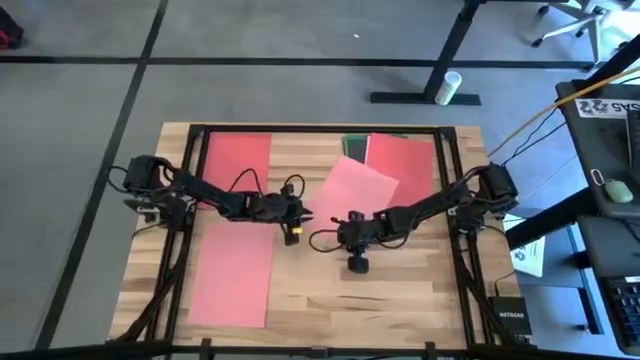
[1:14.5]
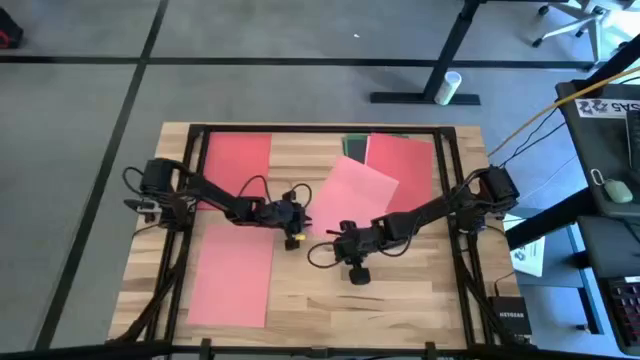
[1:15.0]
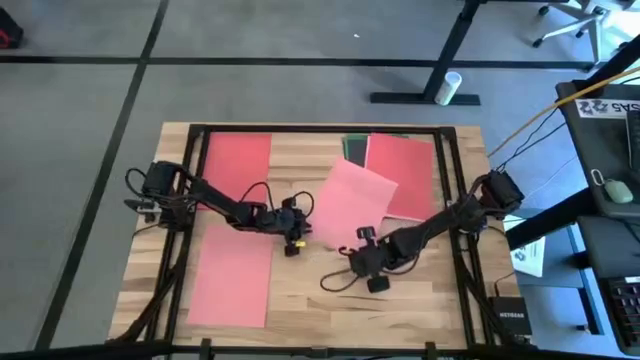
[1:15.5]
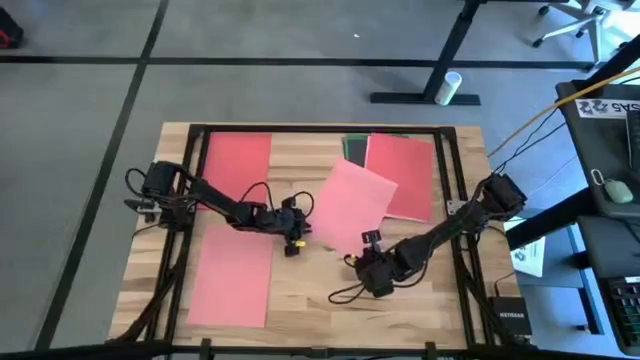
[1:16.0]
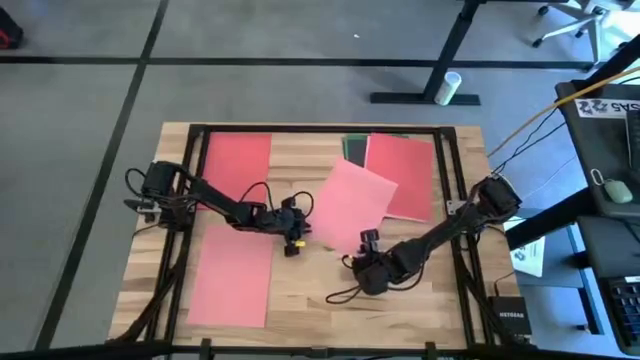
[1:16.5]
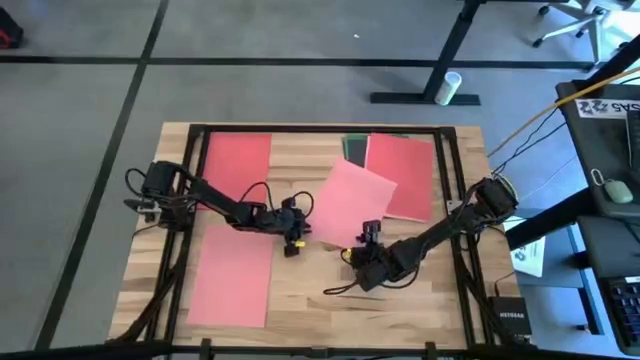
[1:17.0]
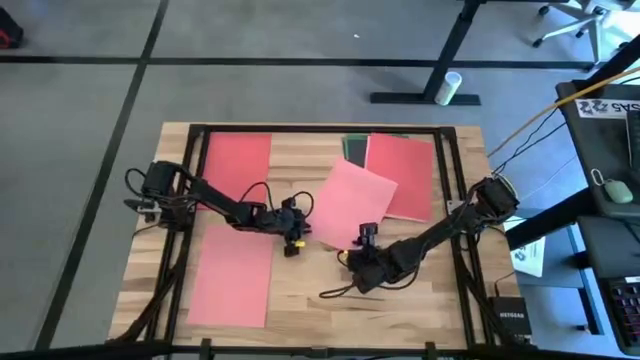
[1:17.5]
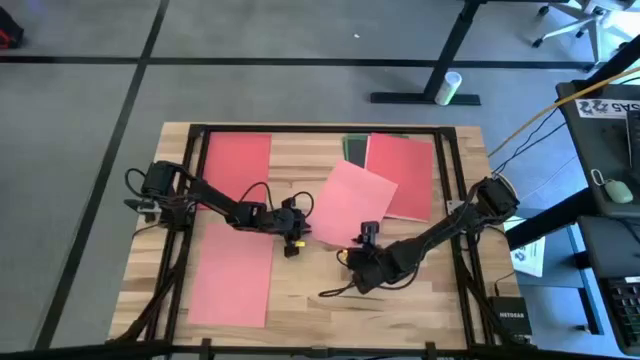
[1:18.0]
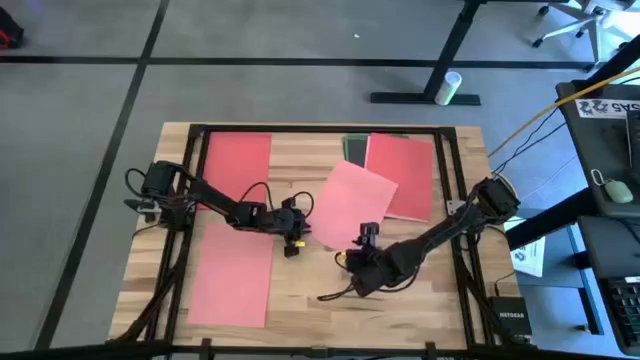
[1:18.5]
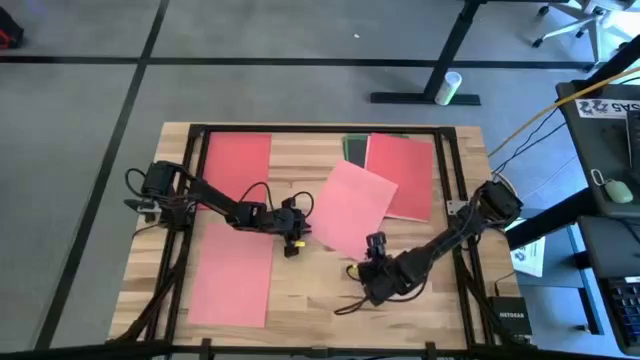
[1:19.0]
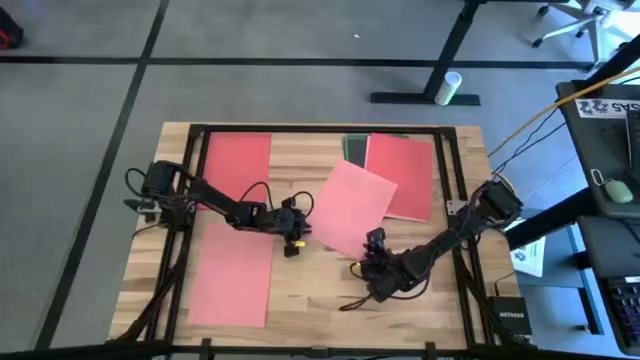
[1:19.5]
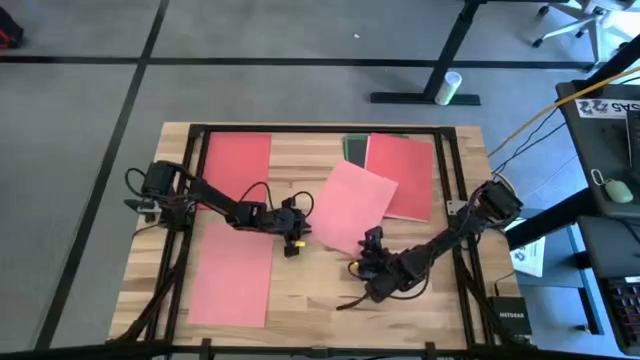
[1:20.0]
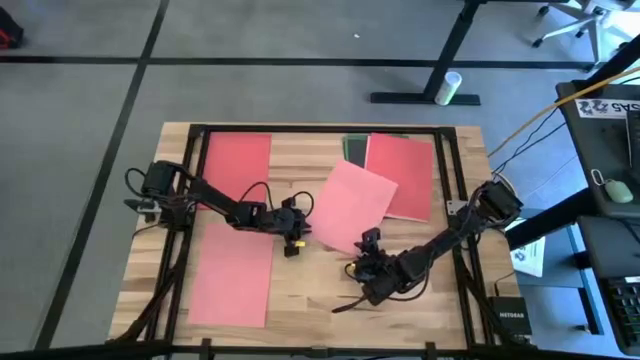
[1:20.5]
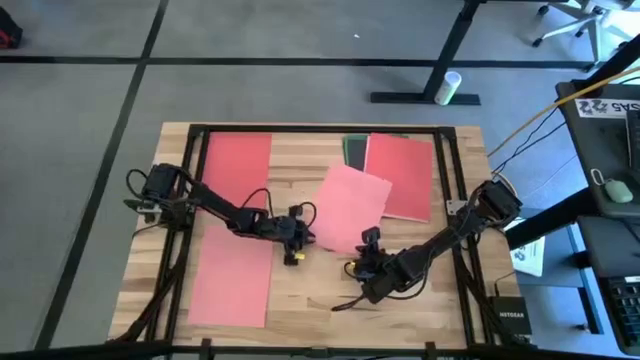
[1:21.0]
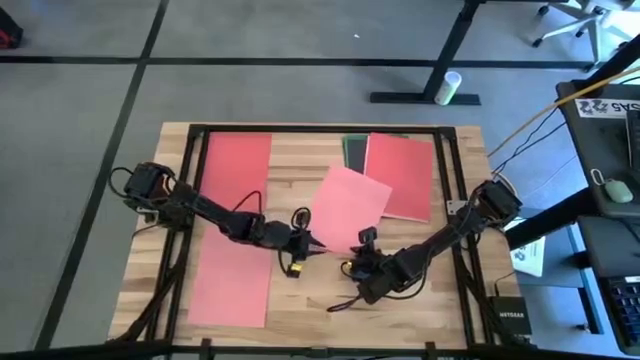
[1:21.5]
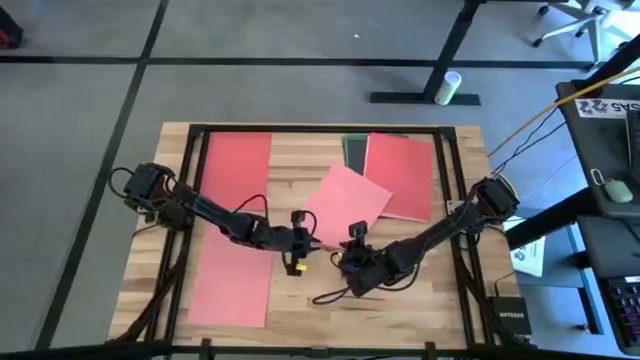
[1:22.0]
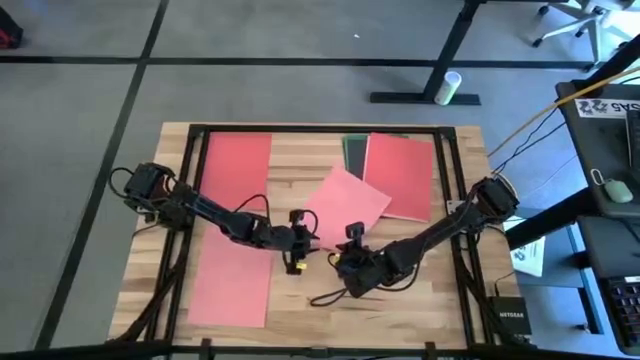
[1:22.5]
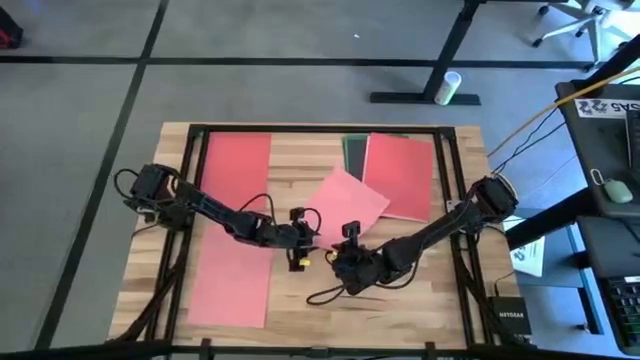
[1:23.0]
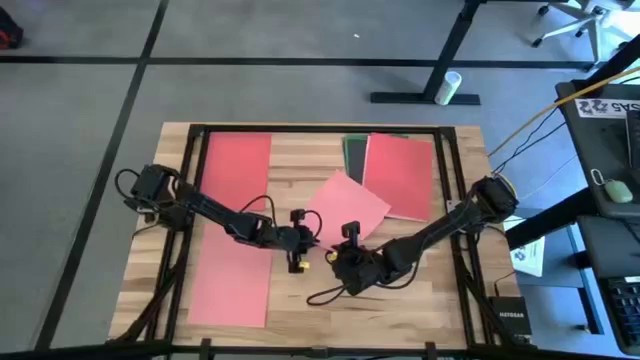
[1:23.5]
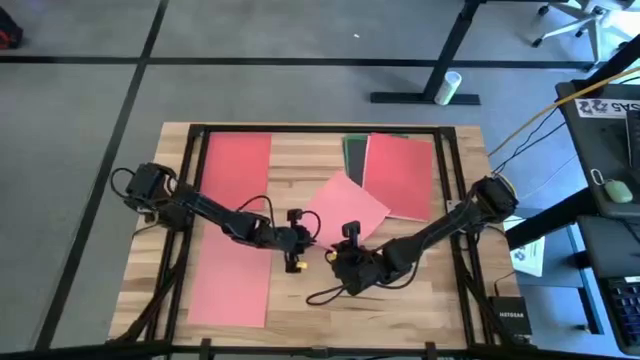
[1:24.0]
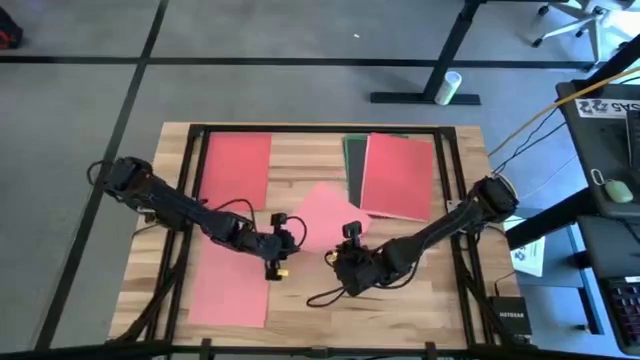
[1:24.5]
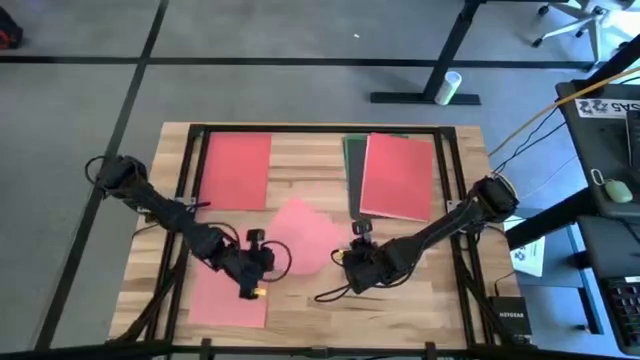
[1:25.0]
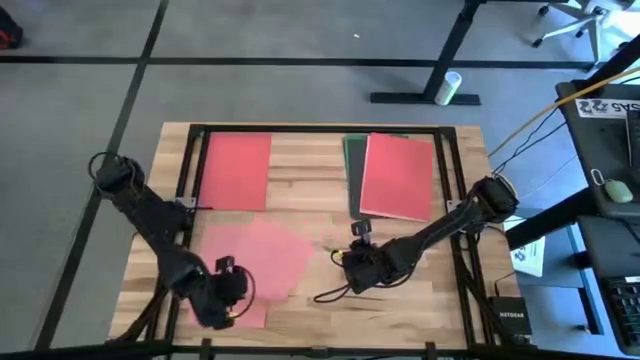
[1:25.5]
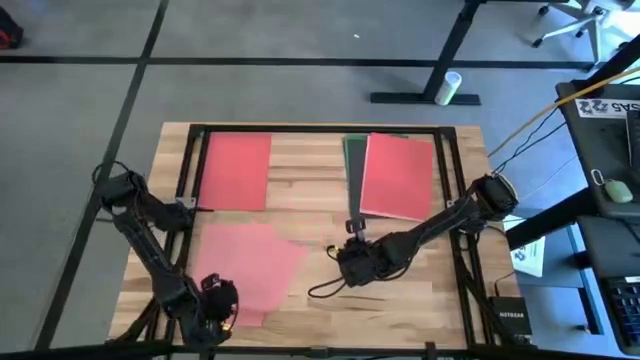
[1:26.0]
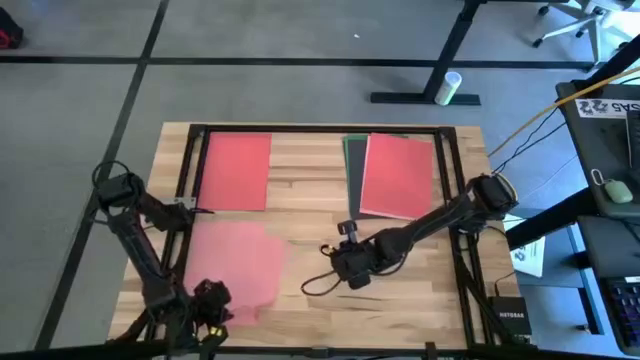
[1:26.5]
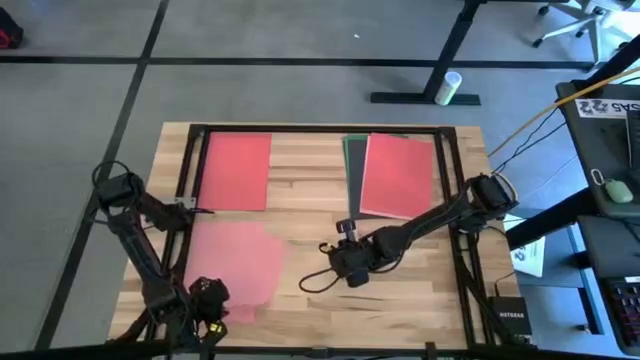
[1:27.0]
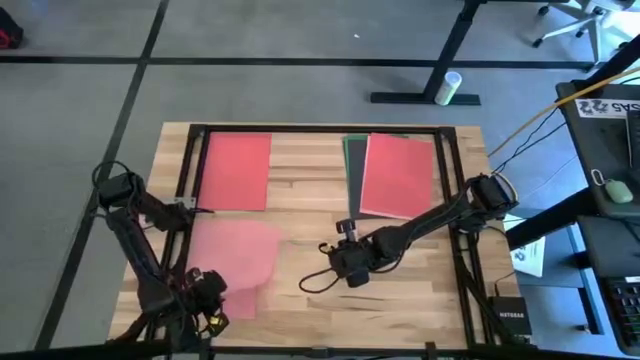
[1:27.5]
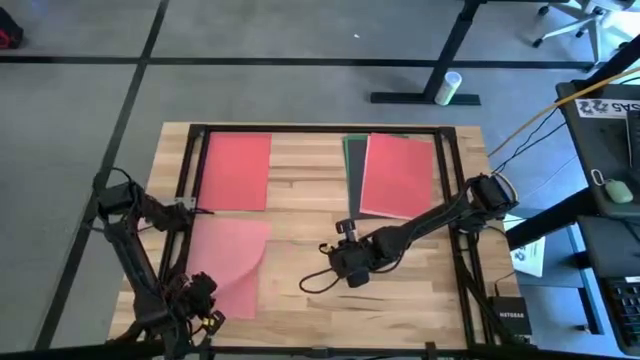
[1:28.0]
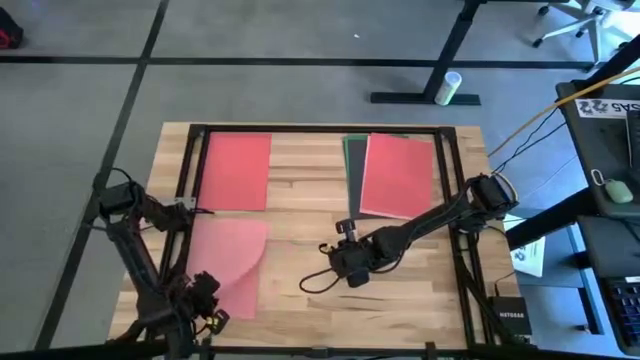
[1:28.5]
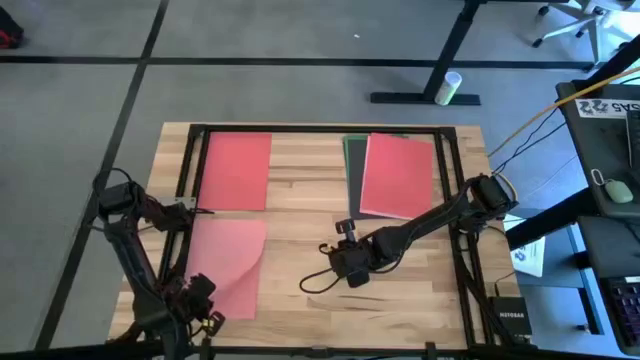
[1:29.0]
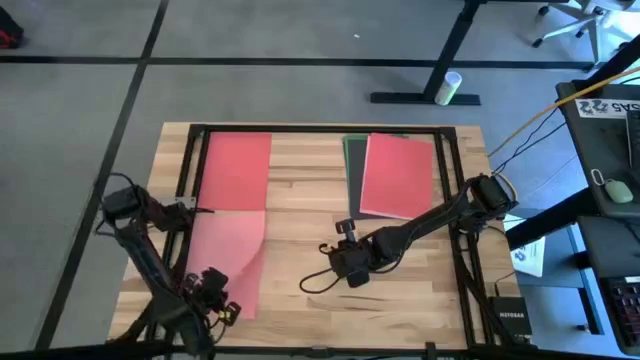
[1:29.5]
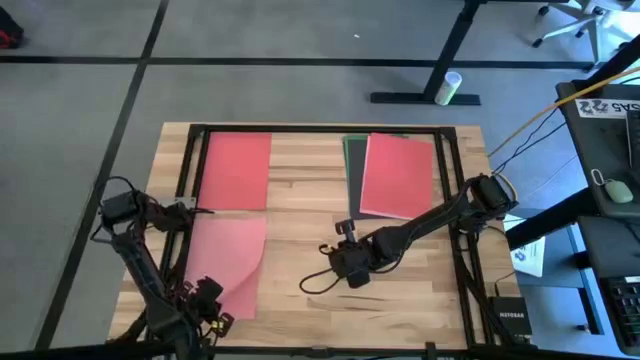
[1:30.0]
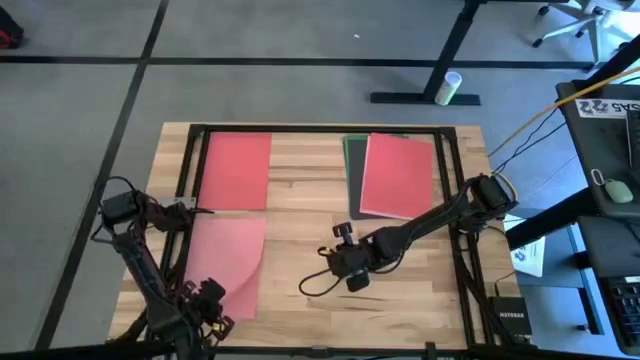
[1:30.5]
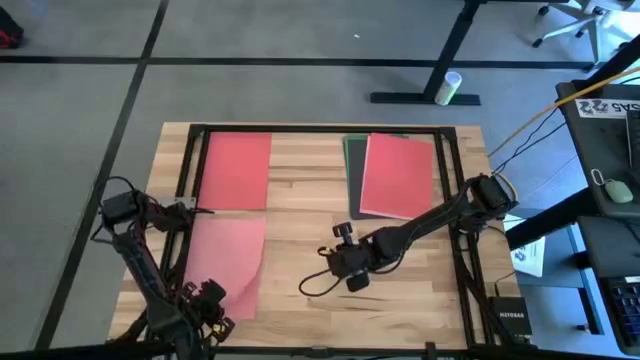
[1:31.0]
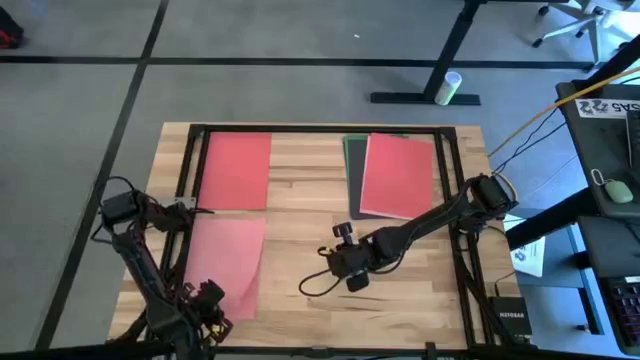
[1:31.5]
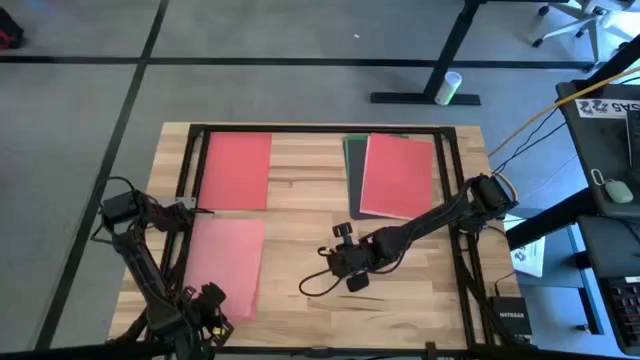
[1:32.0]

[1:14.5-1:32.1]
Task: Organize paper
Stack the pink paper on top of the pink paper

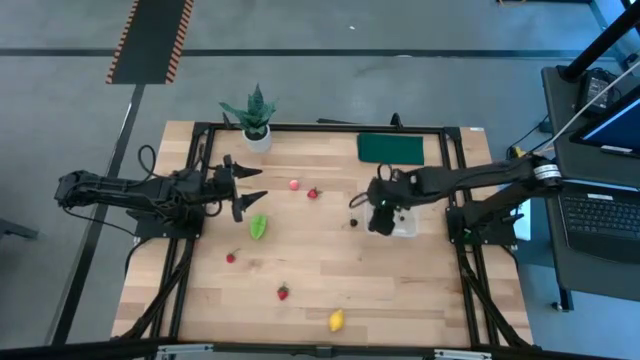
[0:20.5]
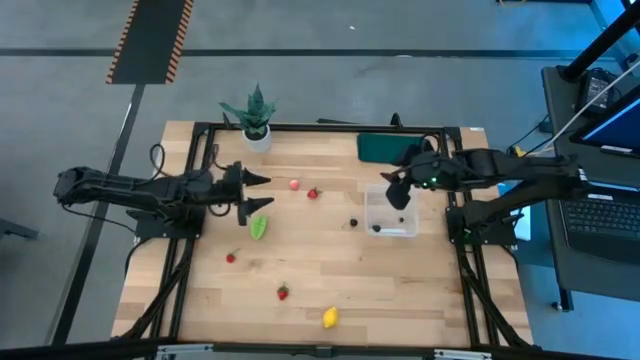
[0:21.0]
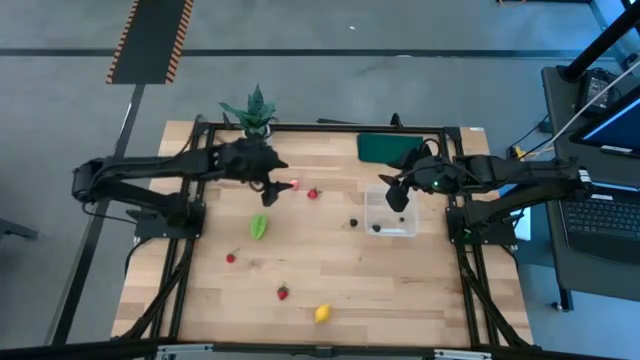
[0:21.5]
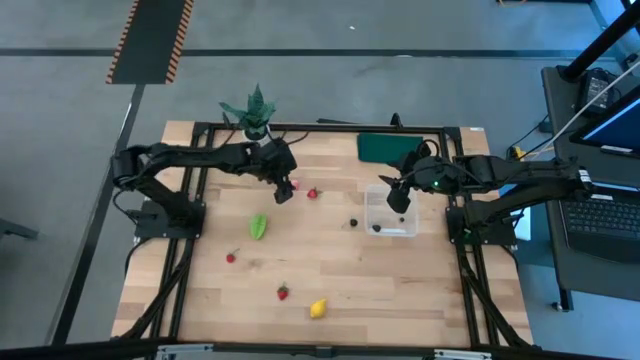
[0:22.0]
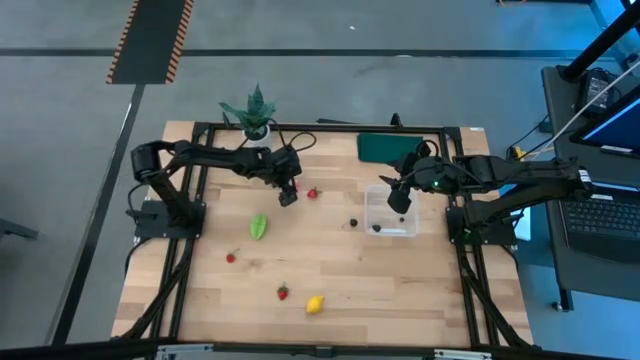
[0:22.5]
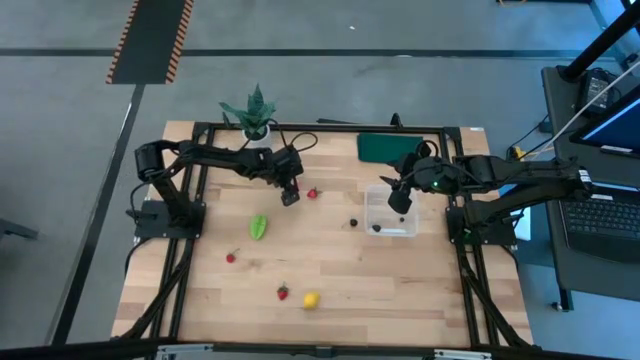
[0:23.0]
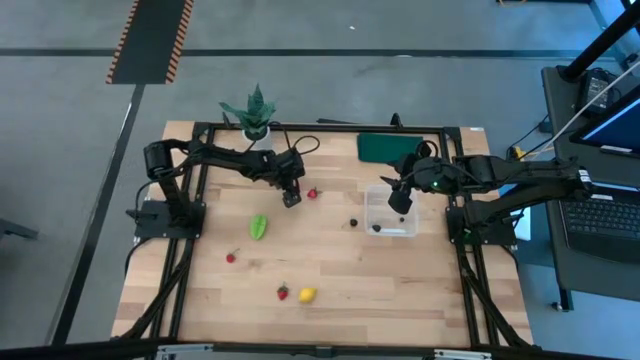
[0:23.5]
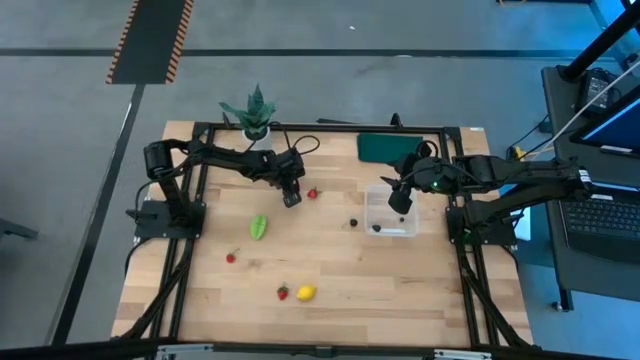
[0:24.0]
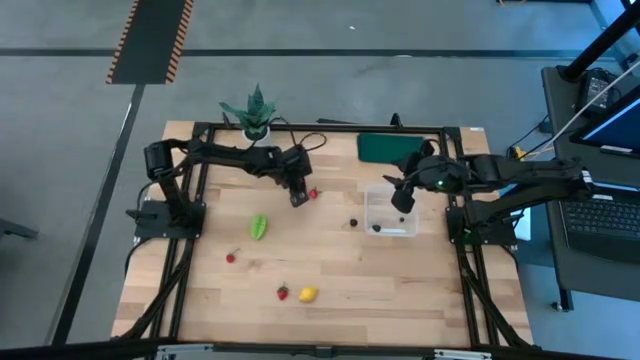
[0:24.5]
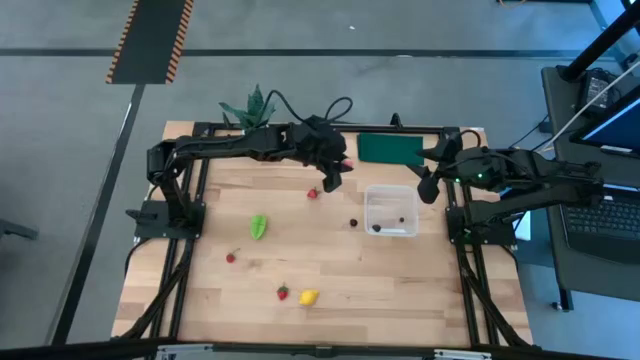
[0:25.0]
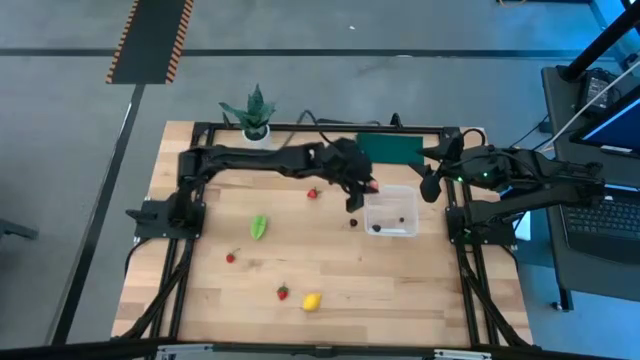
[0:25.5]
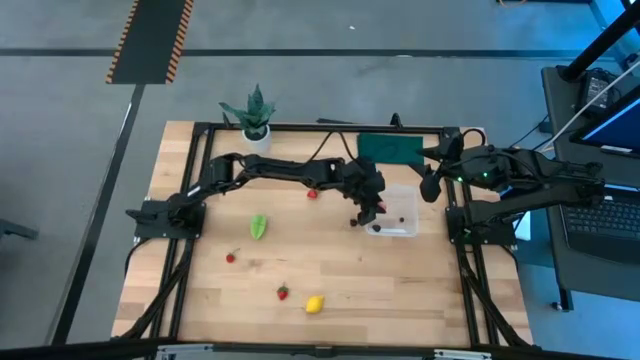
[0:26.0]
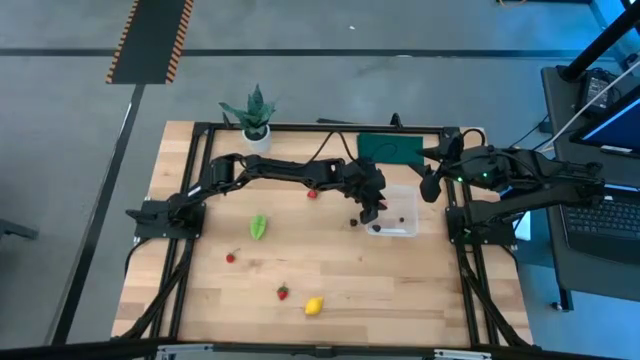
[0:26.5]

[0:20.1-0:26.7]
Task: Pick and placing Produce into tupperware
Put the pink apricot into the transparent container
